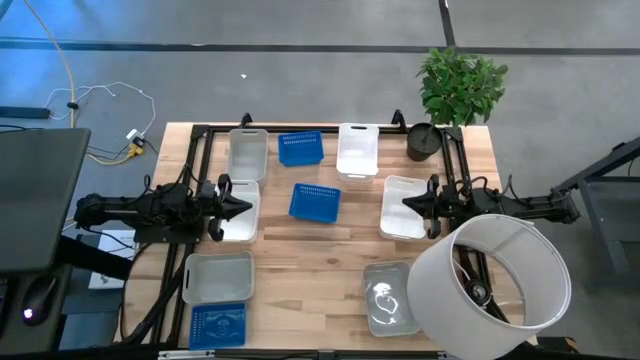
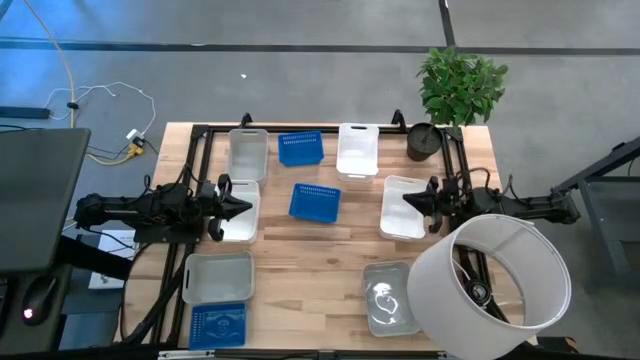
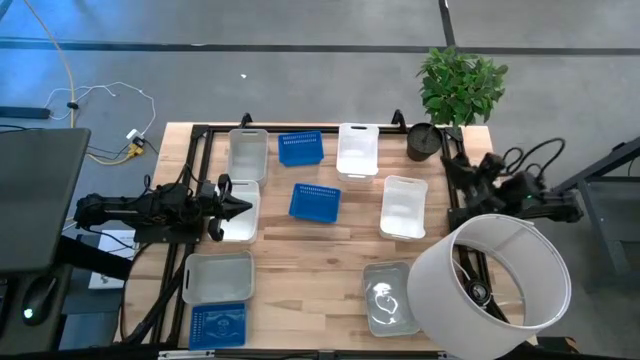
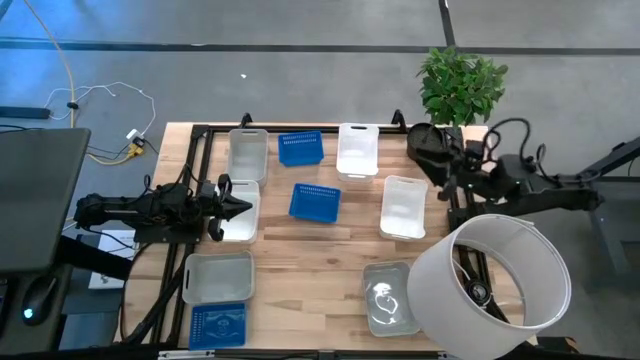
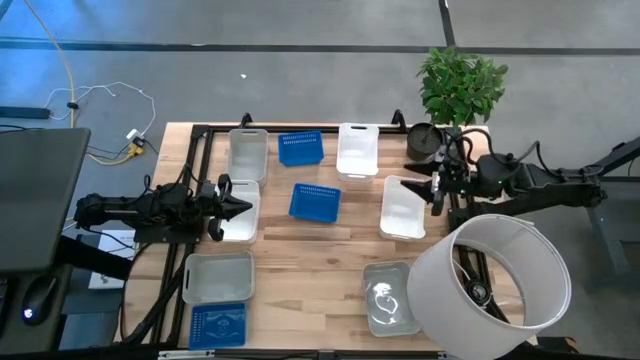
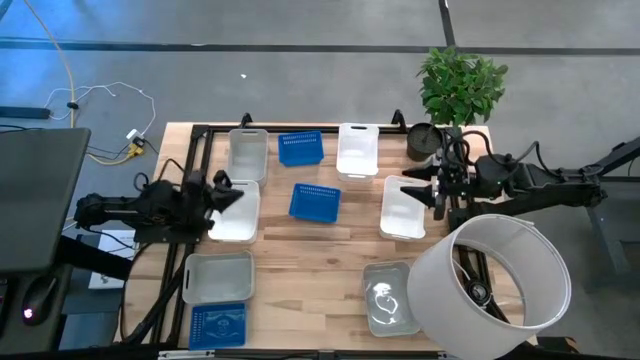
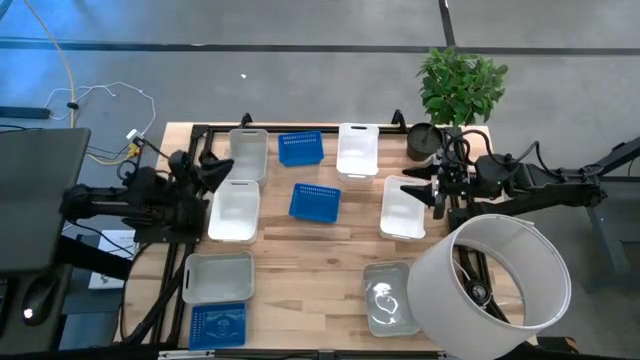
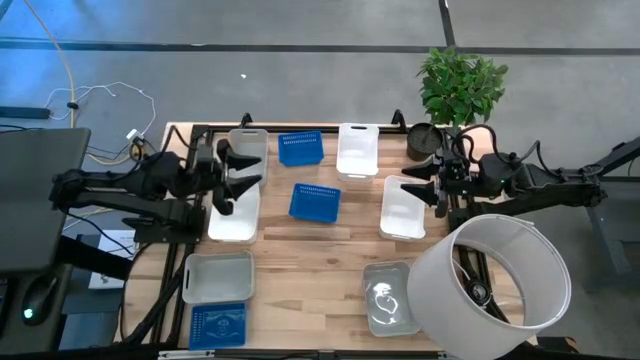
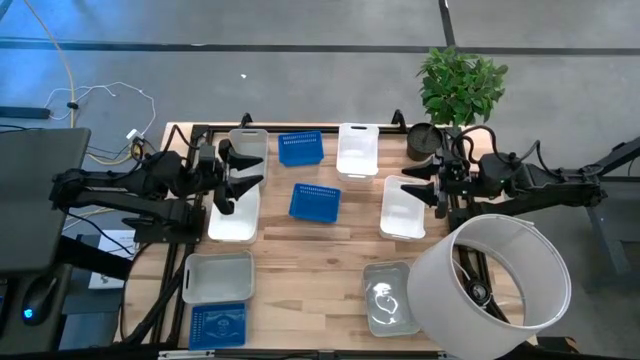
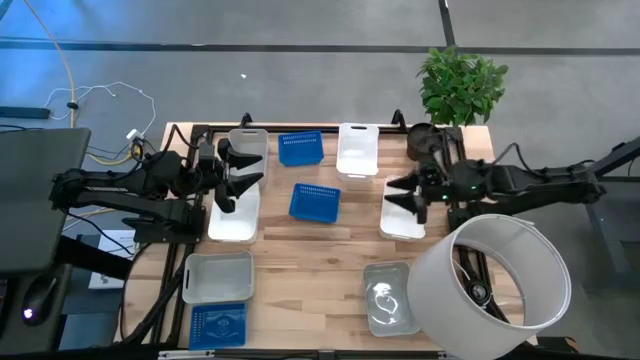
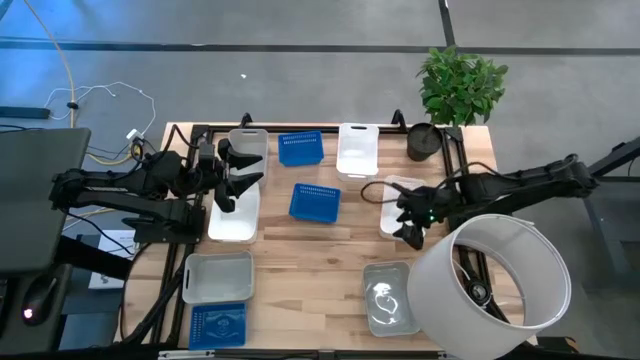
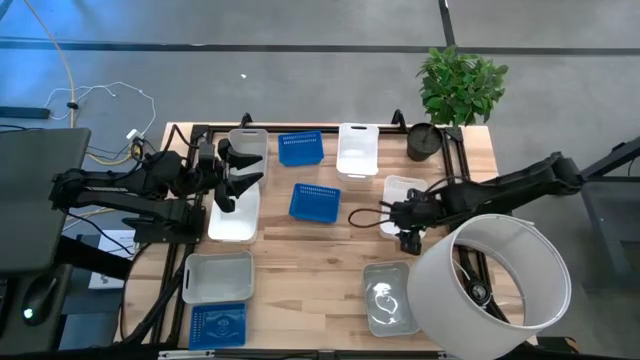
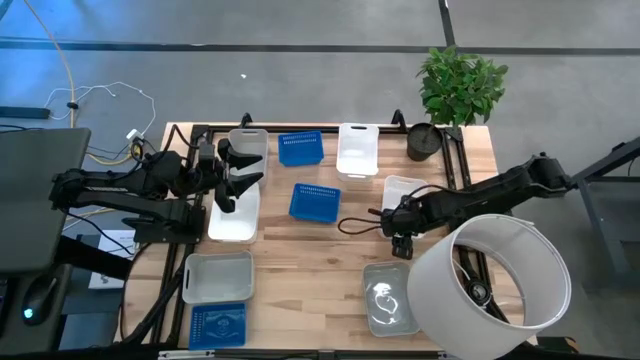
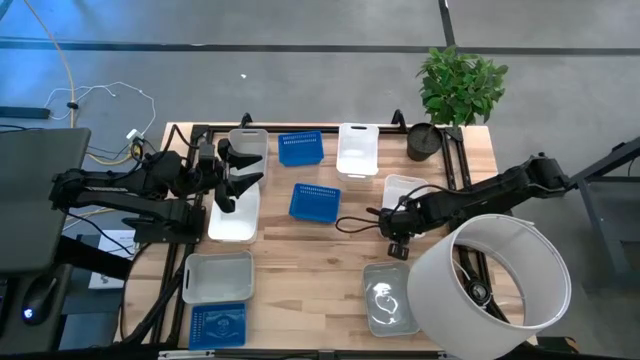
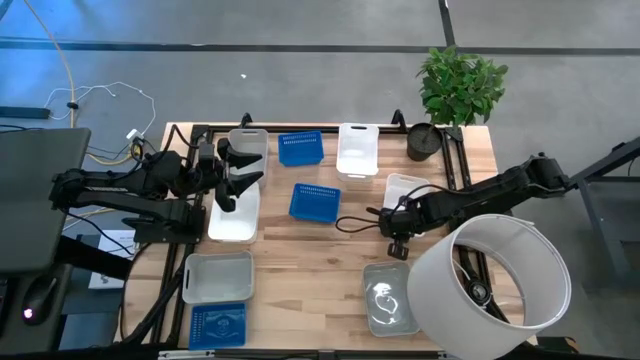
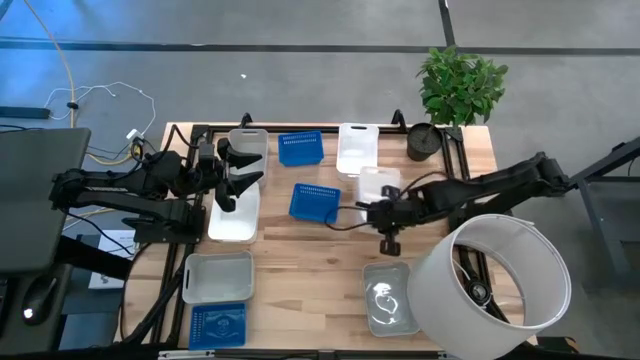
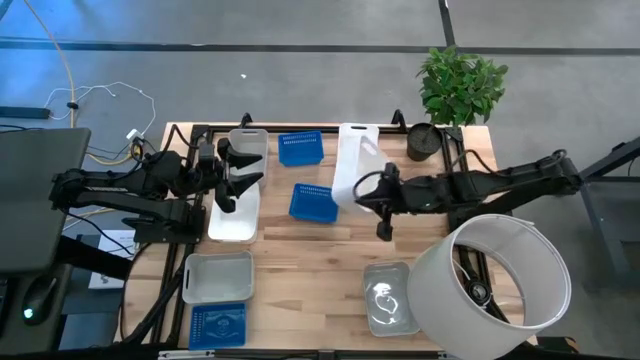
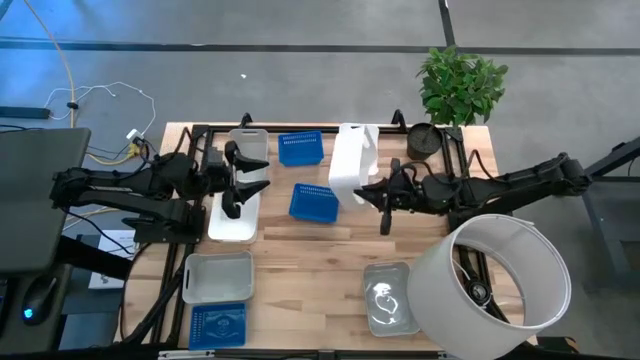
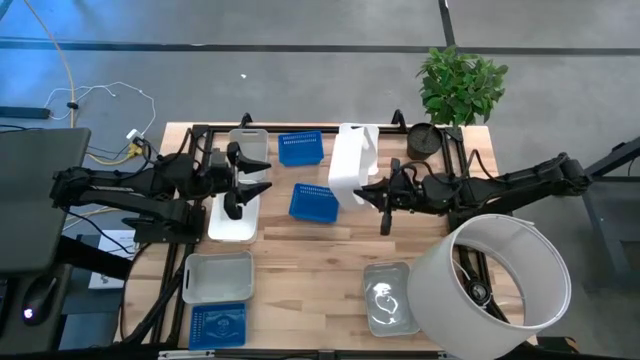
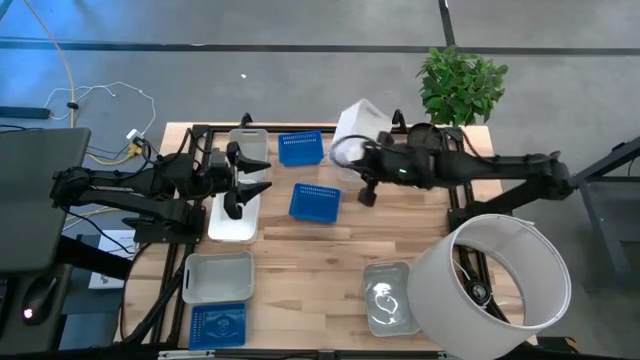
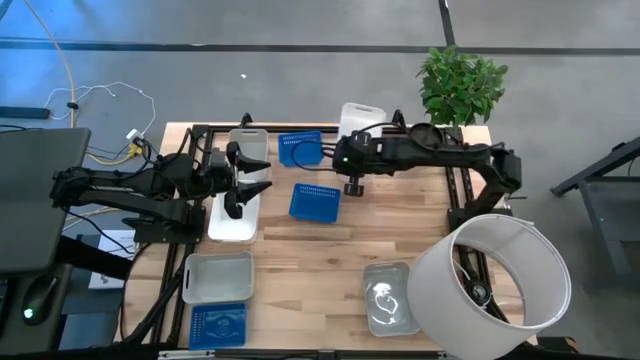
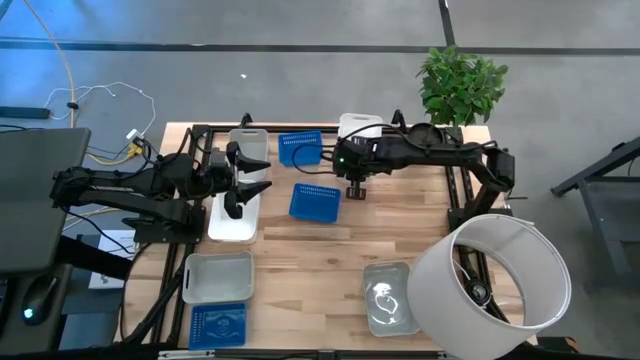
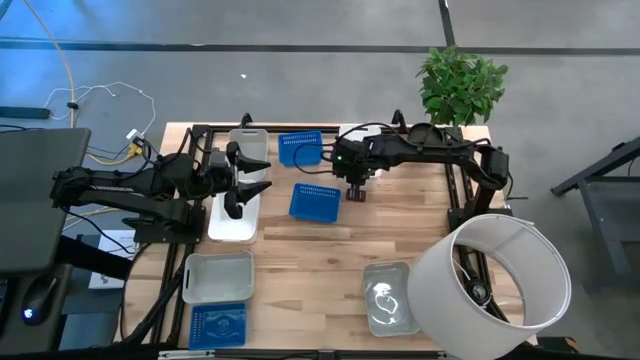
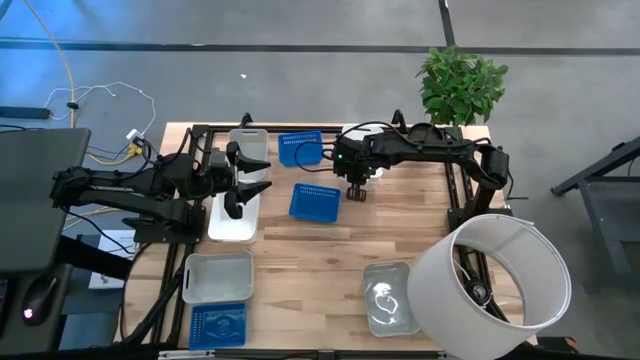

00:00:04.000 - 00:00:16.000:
Stack the bottom right white bin on the top white bin

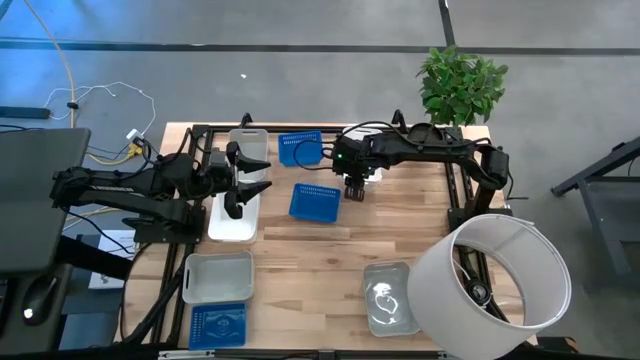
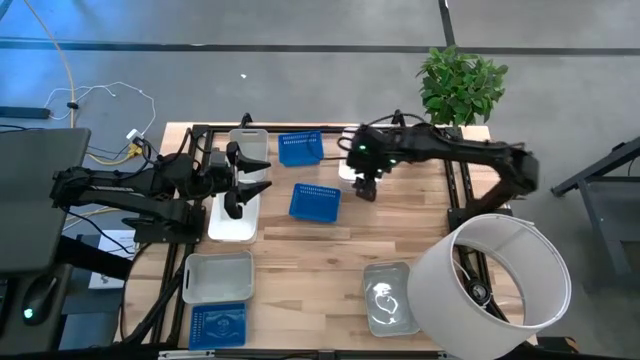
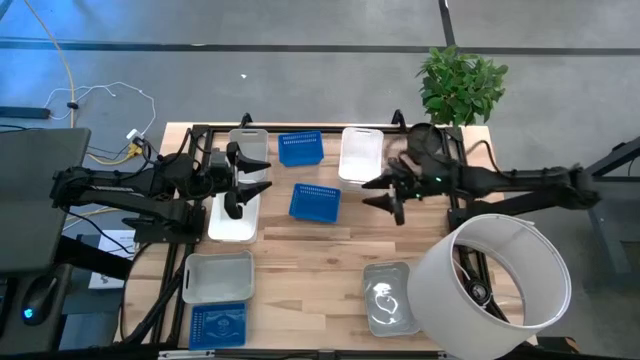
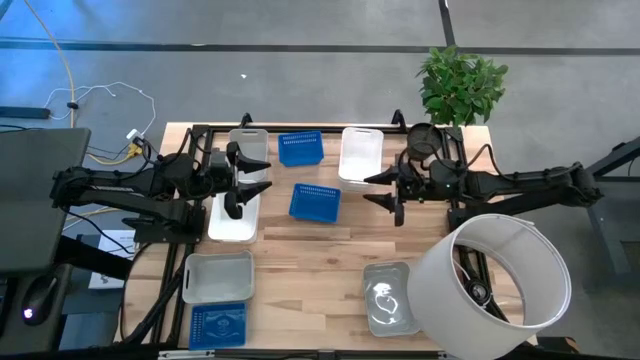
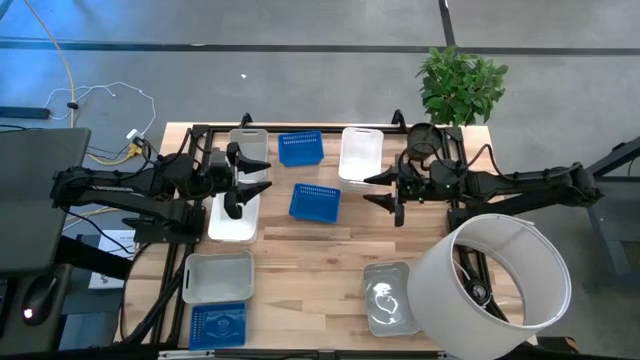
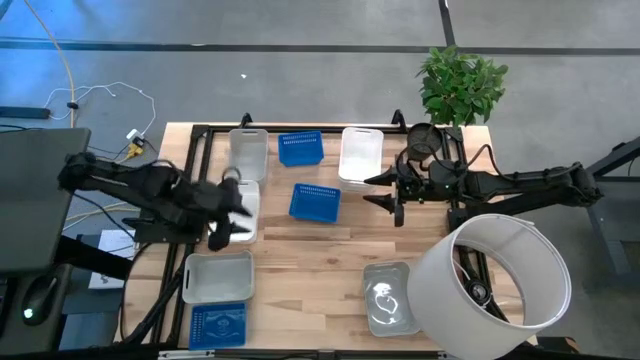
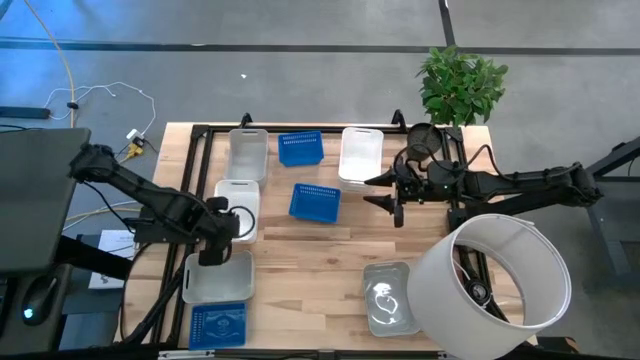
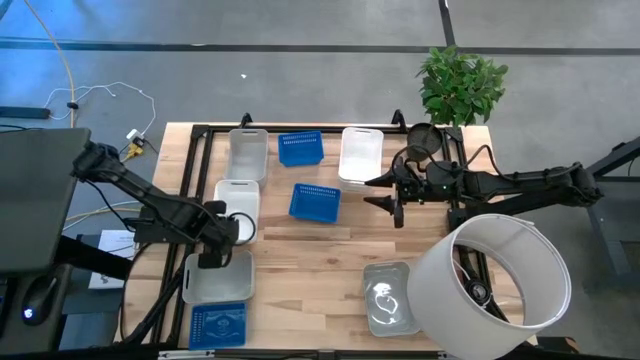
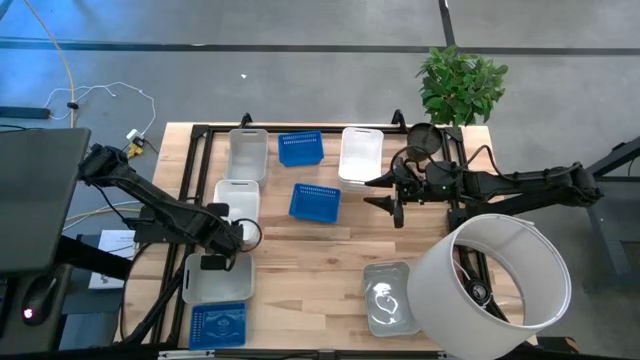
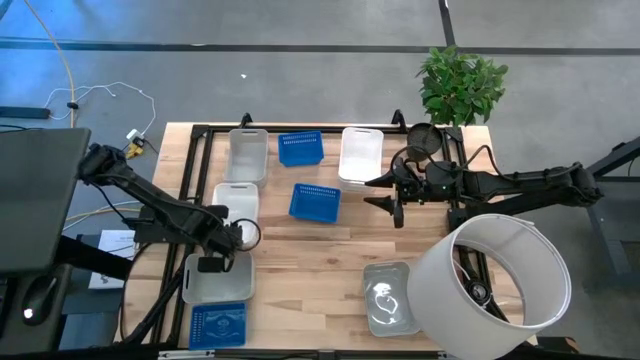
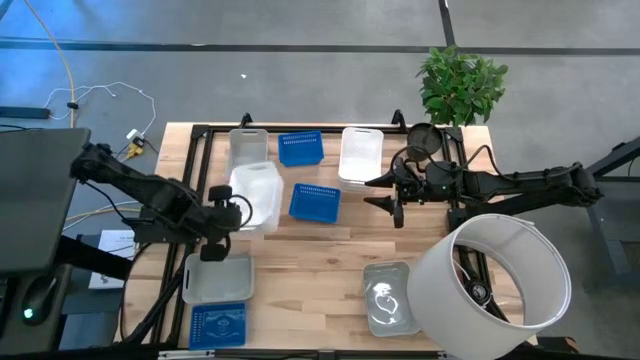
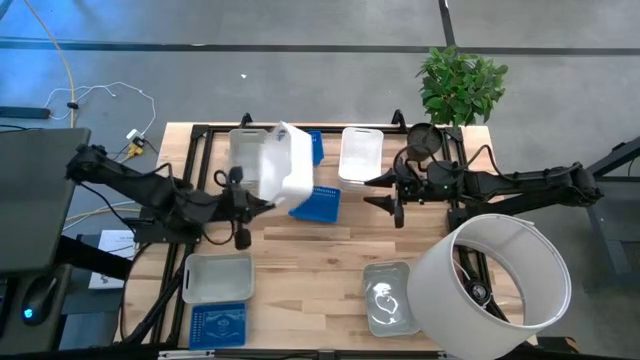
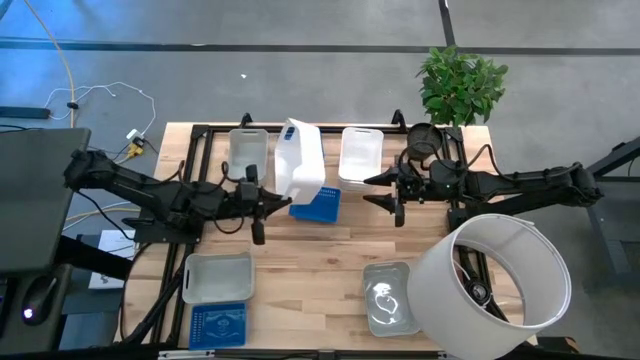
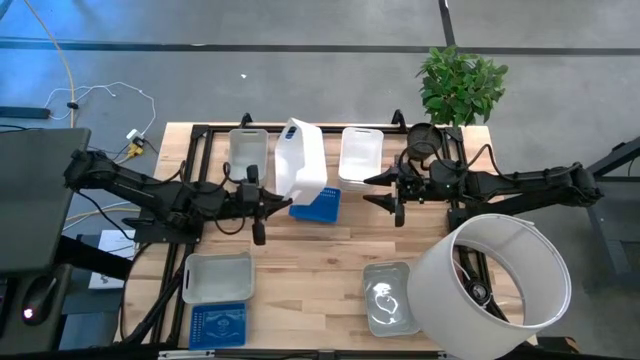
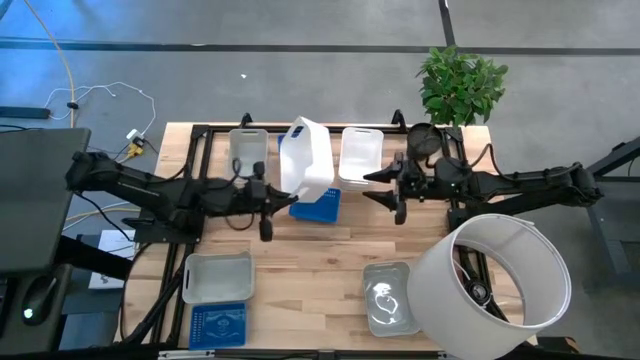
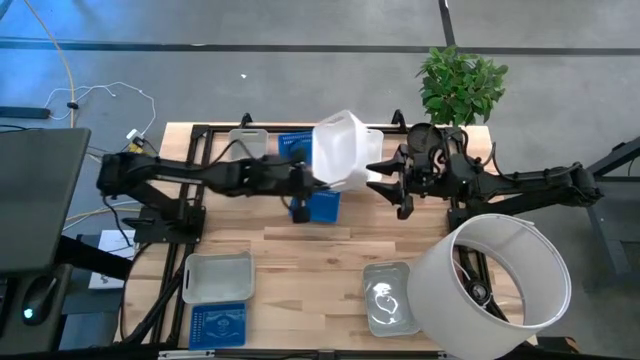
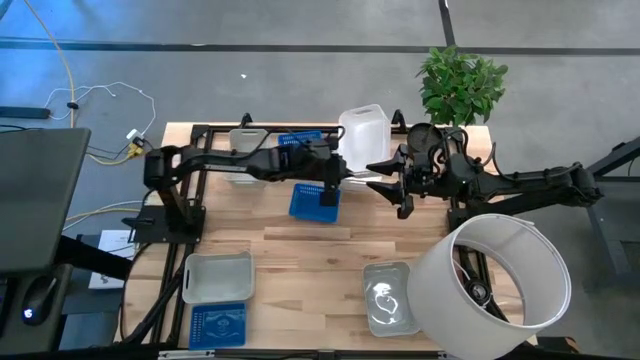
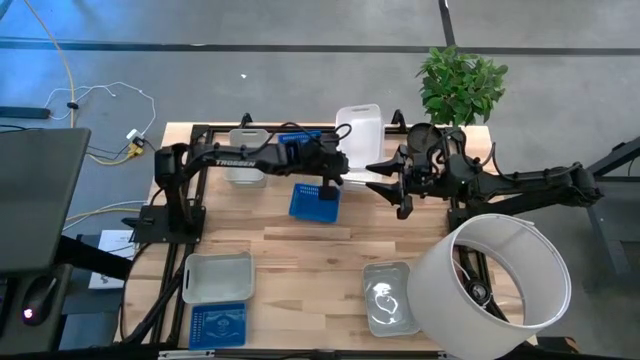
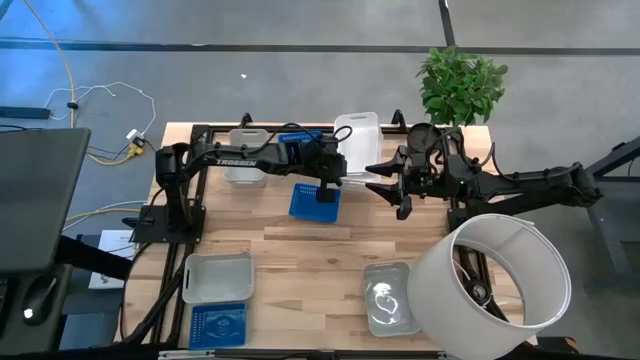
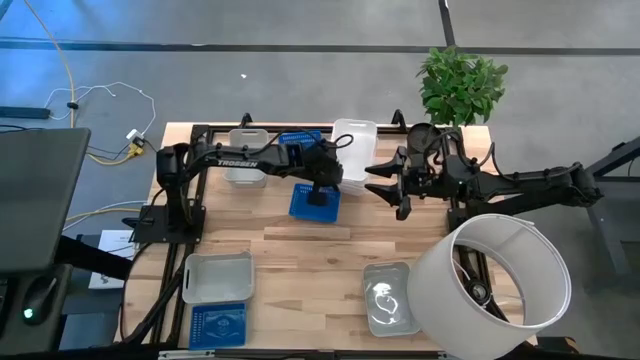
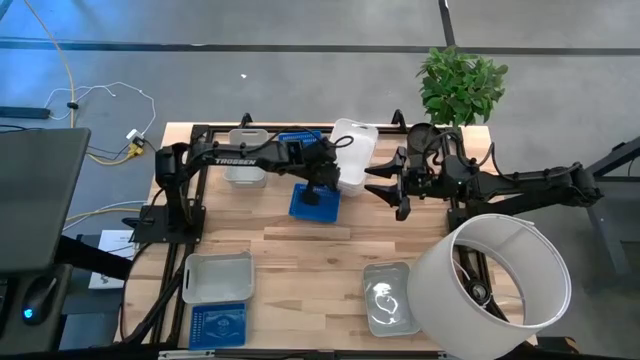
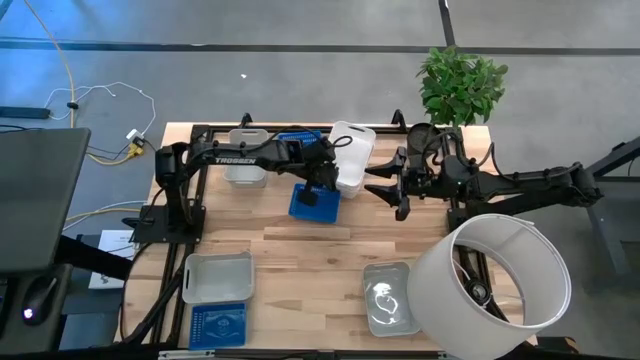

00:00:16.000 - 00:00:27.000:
Stack the left white bin on the right white bin
